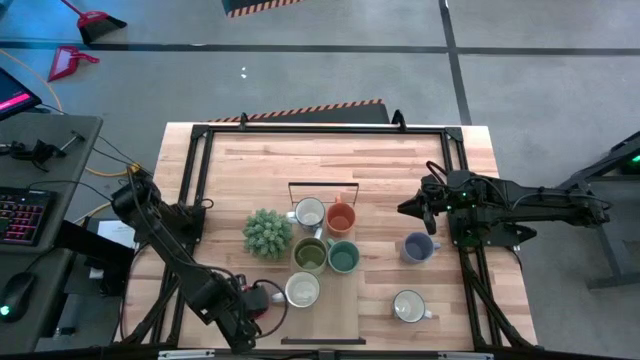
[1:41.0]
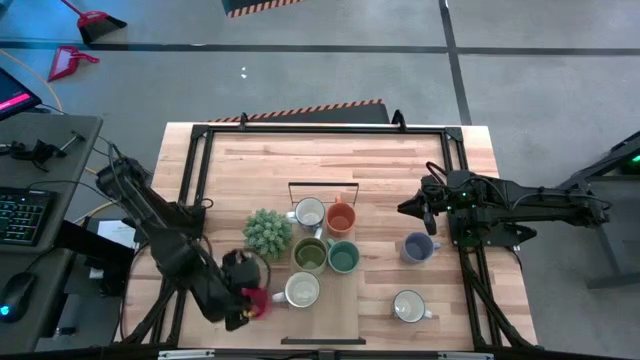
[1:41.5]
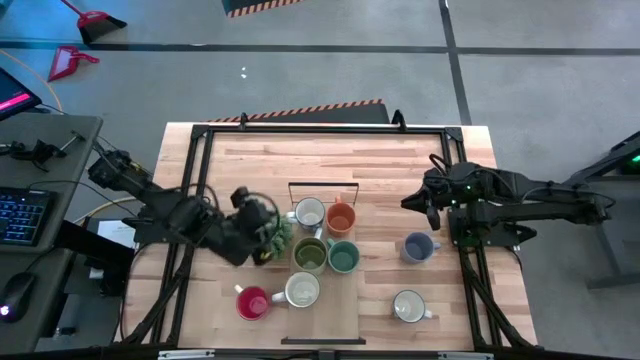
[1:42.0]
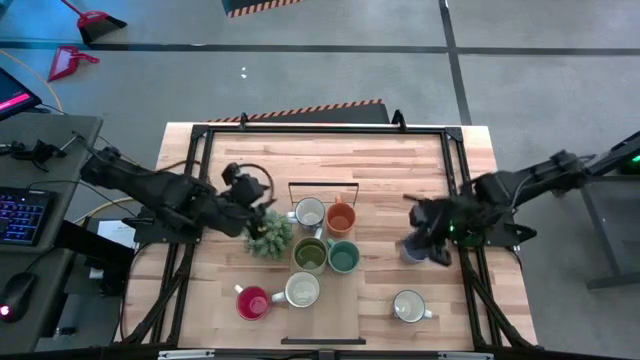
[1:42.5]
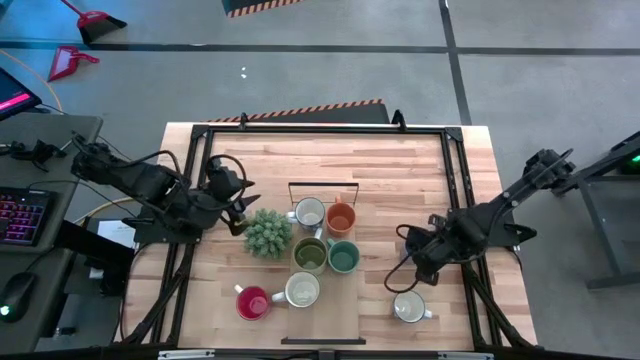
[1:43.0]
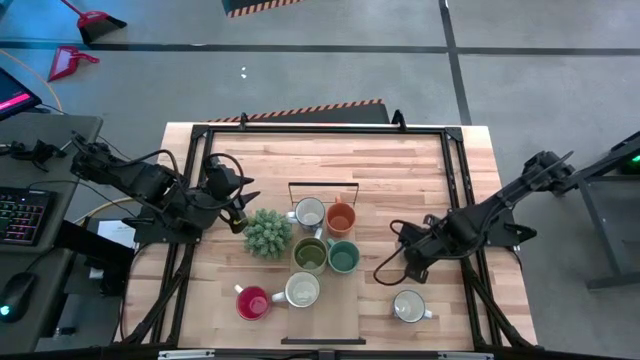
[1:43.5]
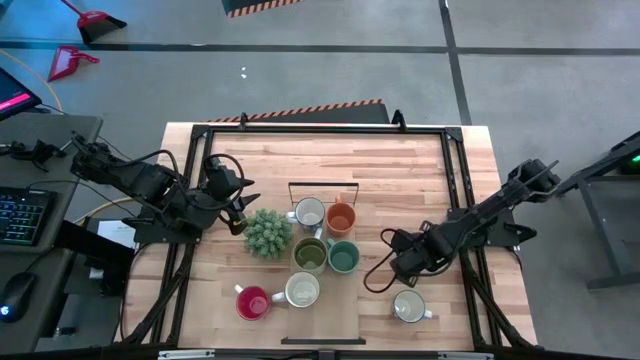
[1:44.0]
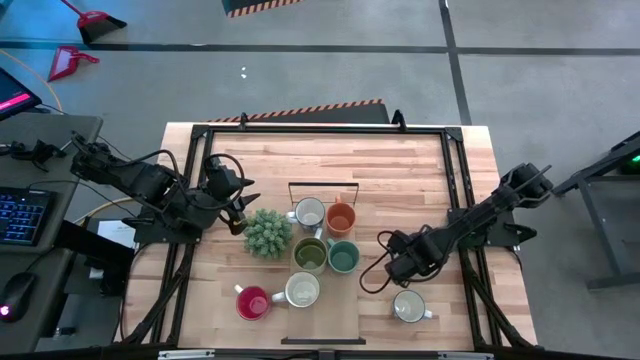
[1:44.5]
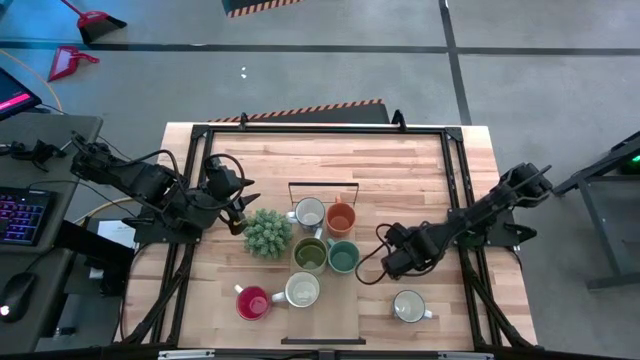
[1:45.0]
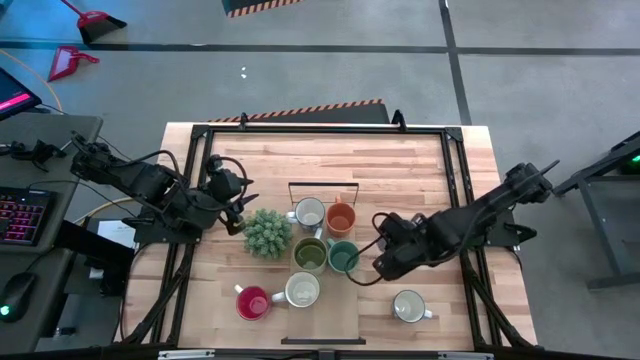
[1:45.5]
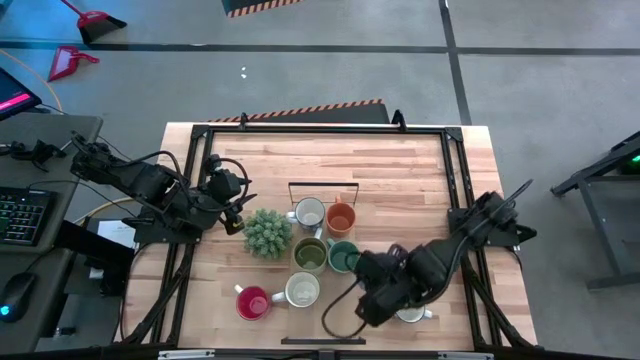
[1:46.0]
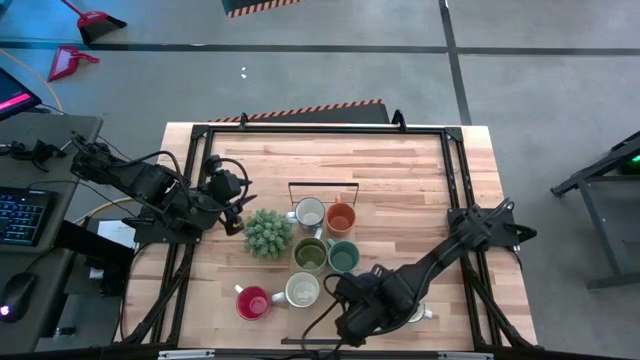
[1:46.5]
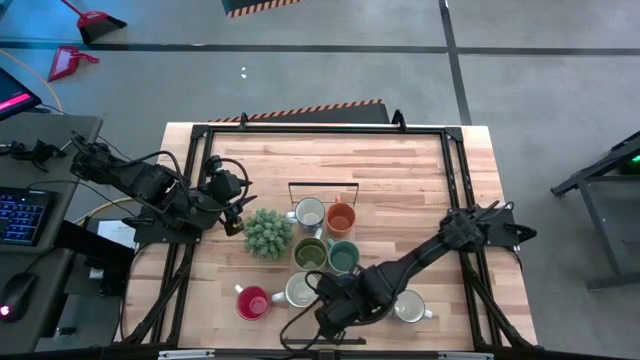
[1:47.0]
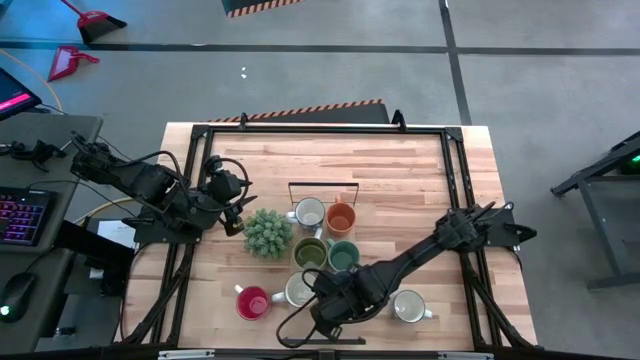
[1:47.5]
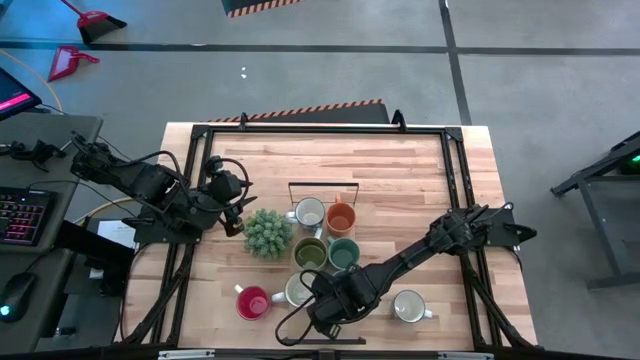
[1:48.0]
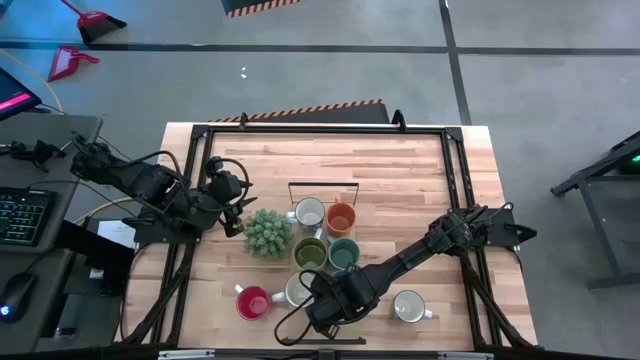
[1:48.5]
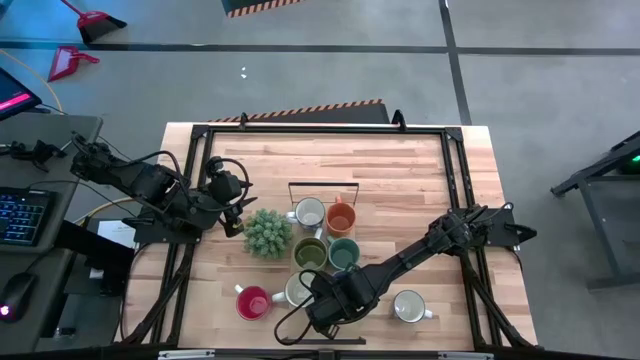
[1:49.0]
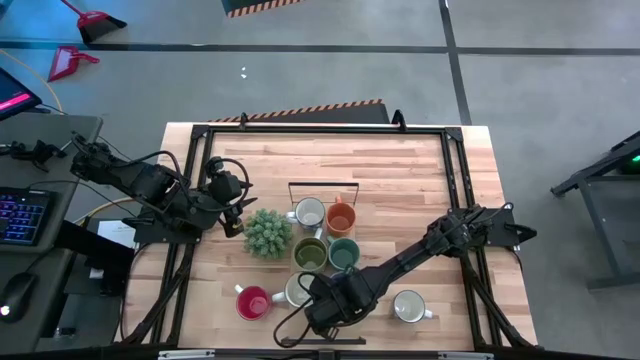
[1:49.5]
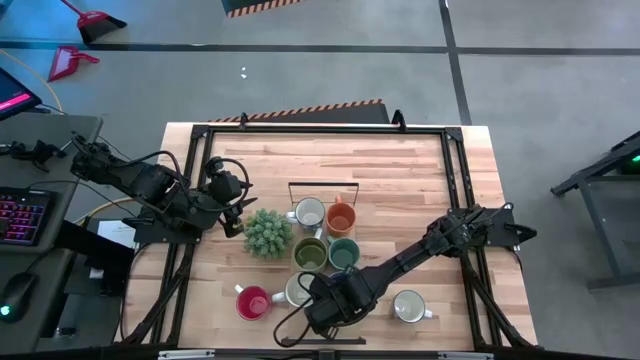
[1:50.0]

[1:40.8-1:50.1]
Task: Place coffee mugs
Put the purple mug on the shelf

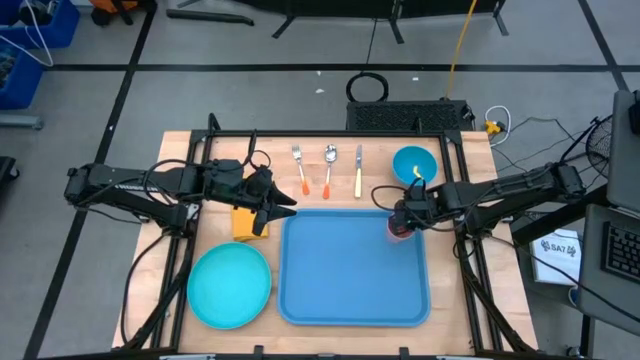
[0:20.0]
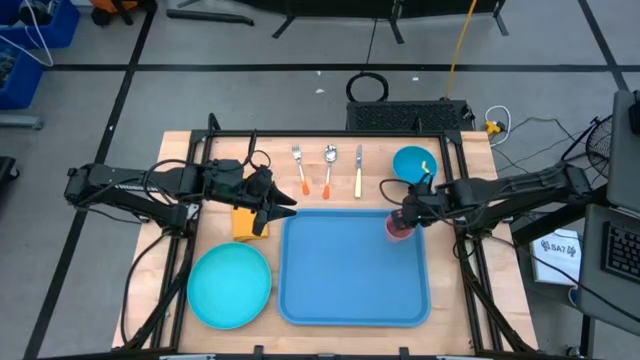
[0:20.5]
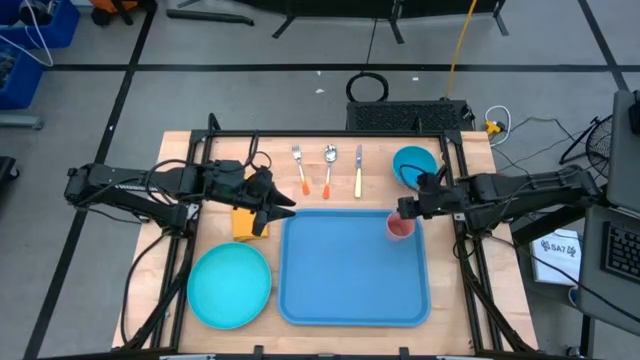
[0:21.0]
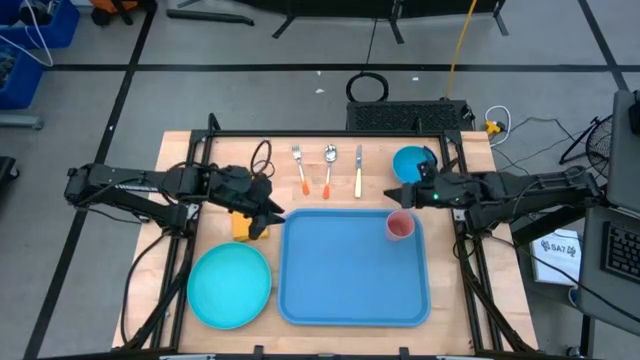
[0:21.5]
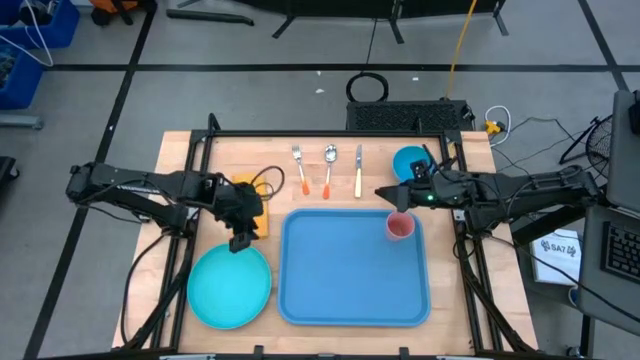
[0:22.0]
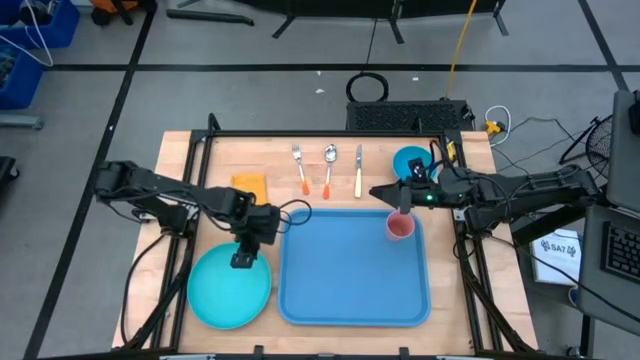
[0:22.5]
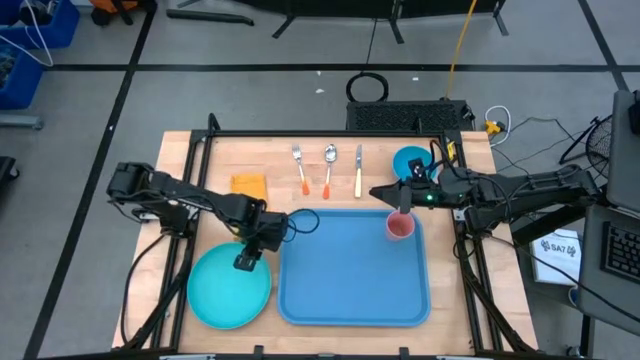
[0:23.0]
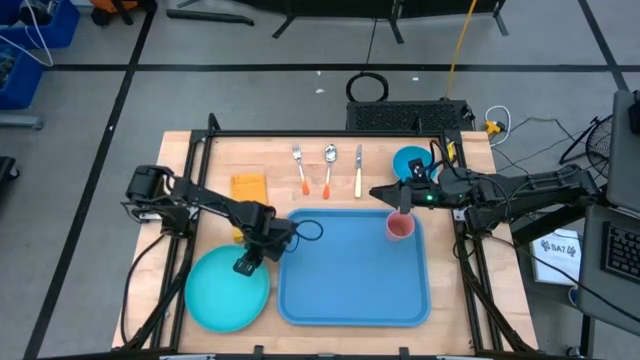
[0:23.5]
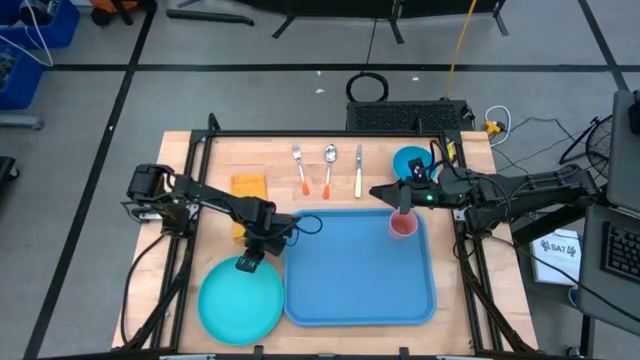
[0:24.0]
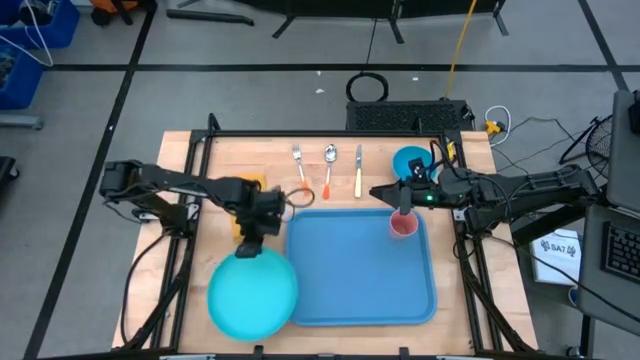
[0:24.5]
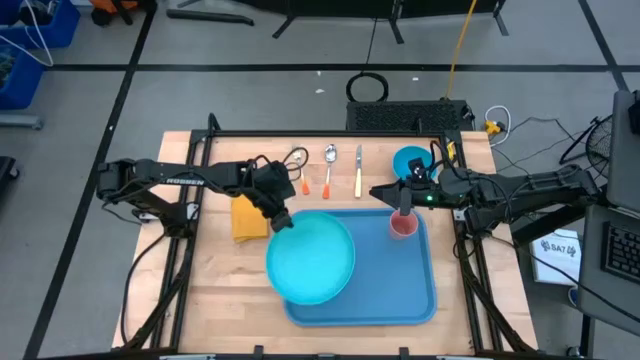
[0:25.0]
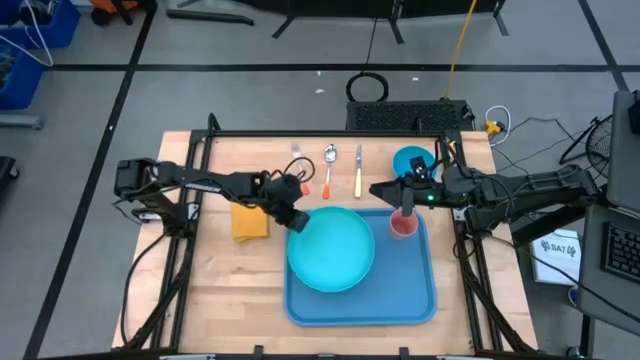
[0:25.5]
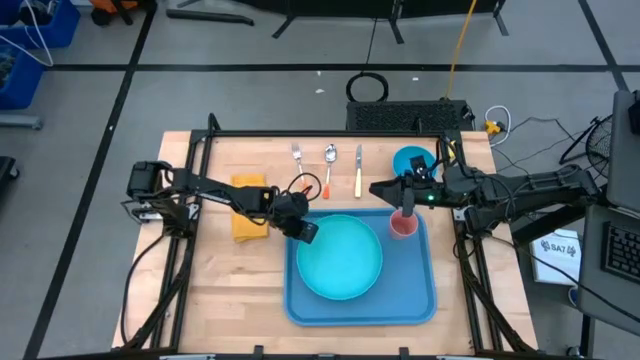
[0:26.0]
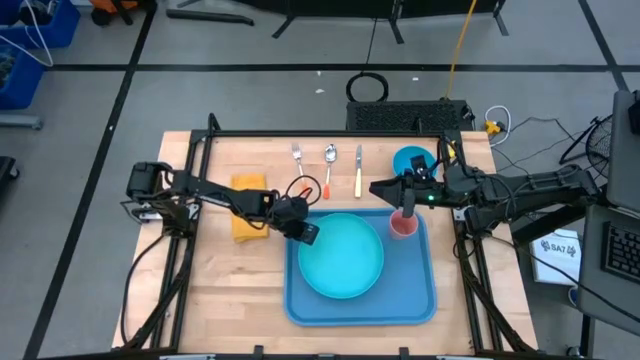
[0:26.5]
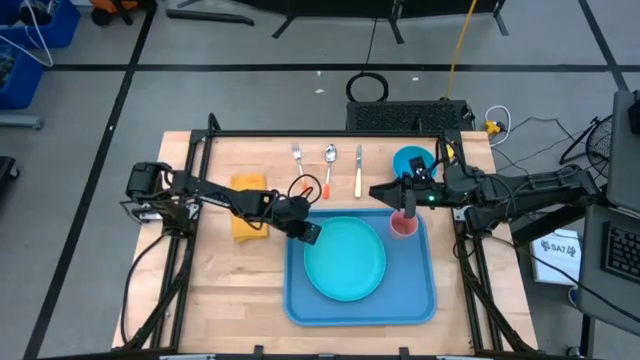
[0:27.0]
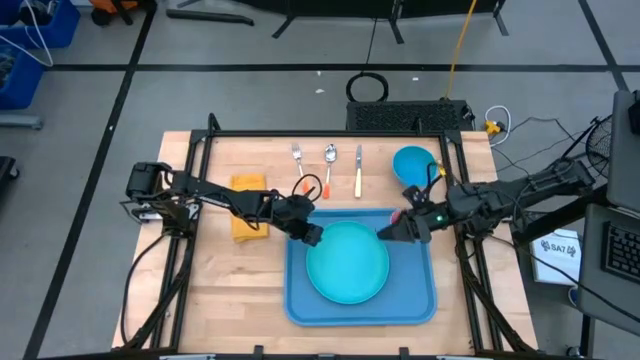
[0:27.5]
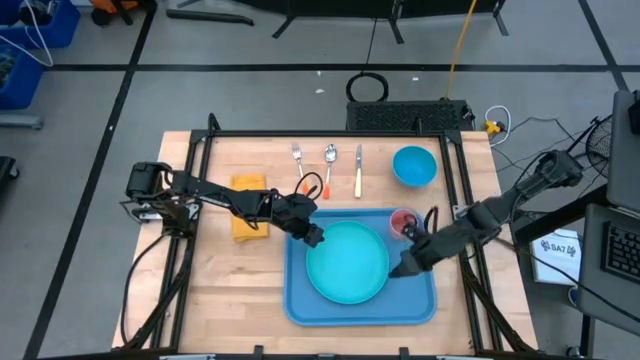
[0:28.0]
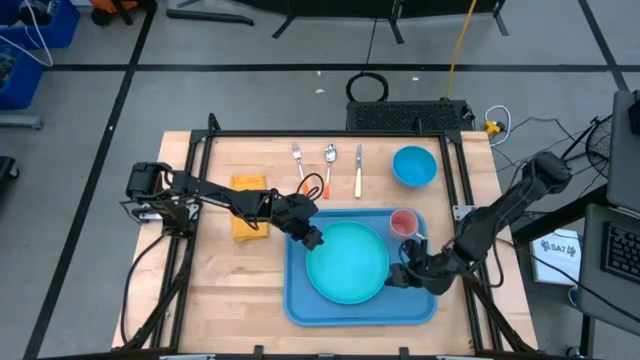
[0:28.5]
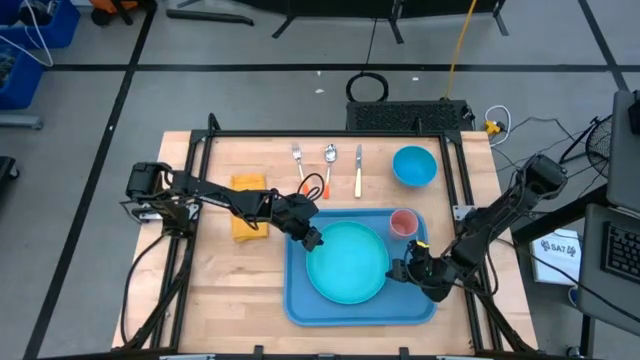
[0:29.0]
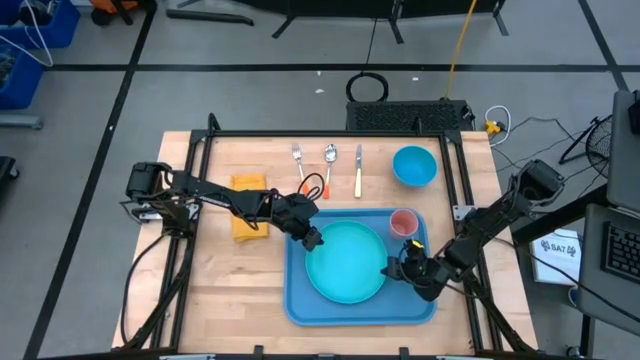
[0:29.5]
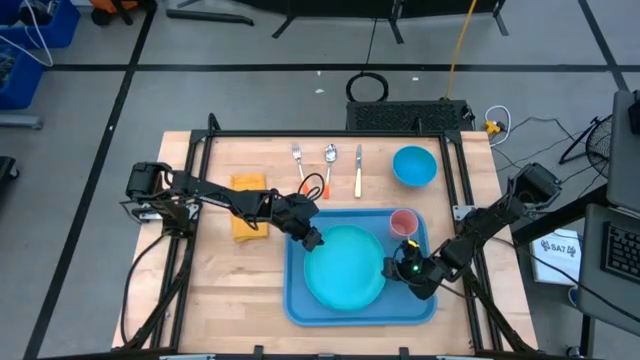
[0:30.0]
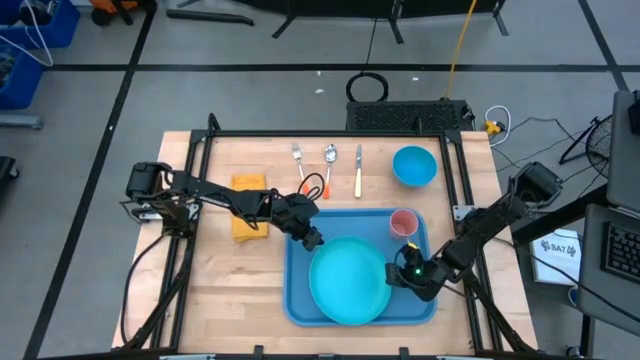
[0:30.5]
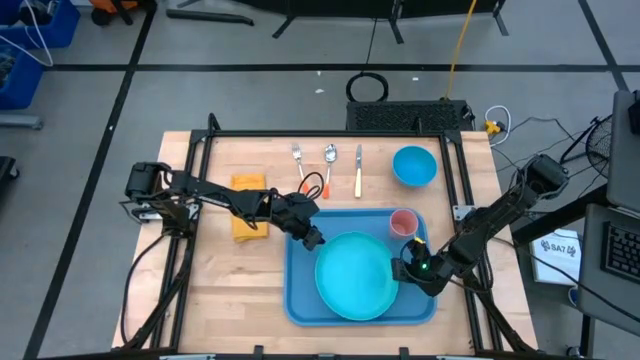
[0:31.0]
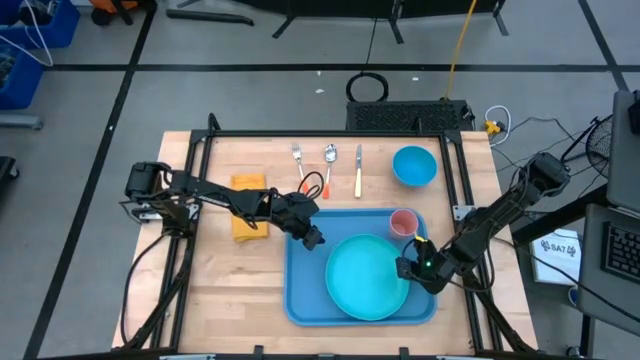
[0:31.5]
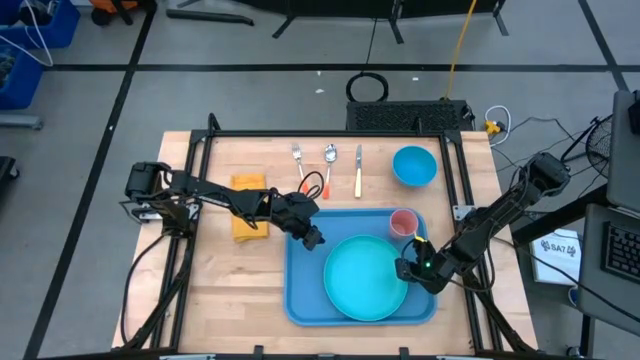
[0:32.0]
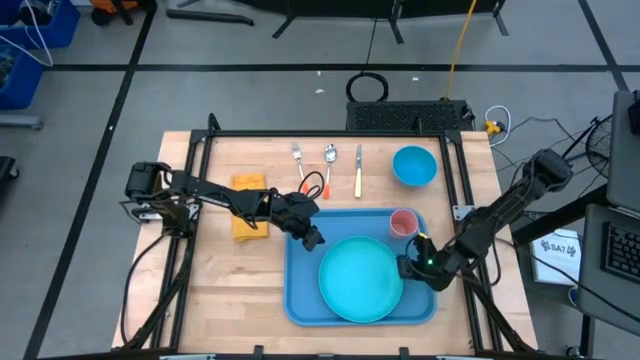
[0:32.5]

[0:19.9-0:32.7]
Task: Set up tray
Put the green plate at the center of the blue serving tray
